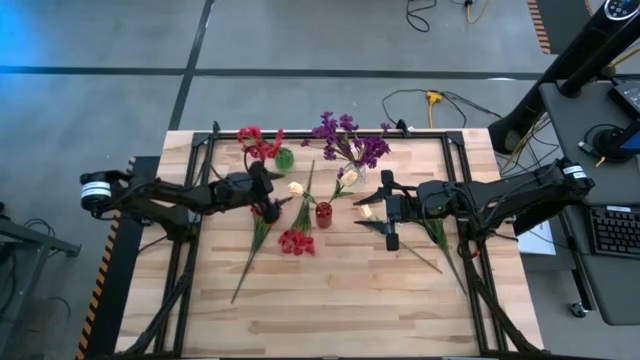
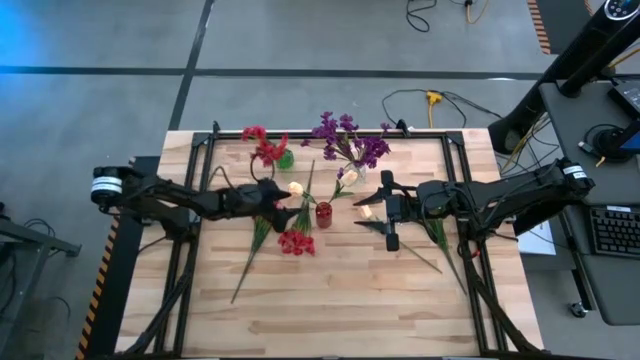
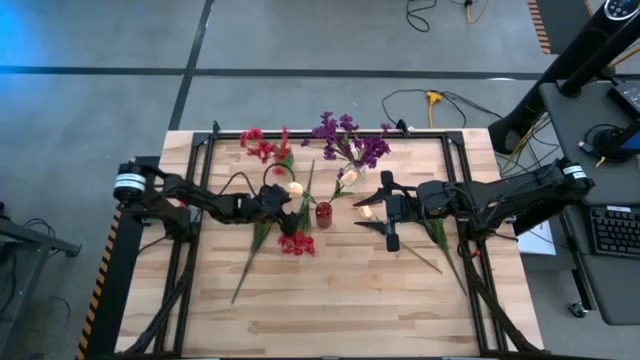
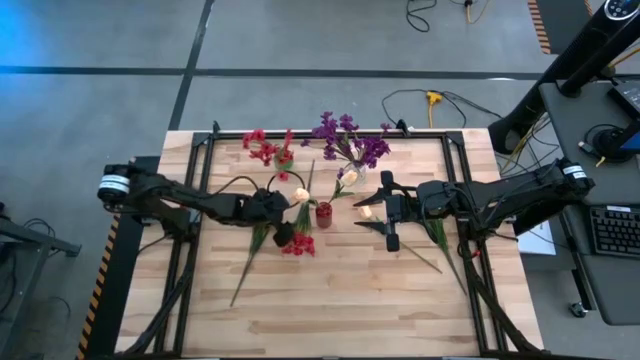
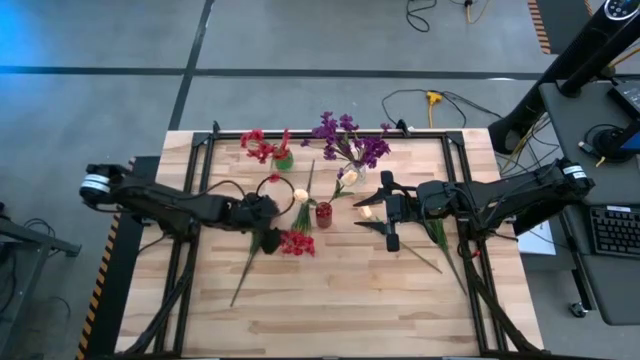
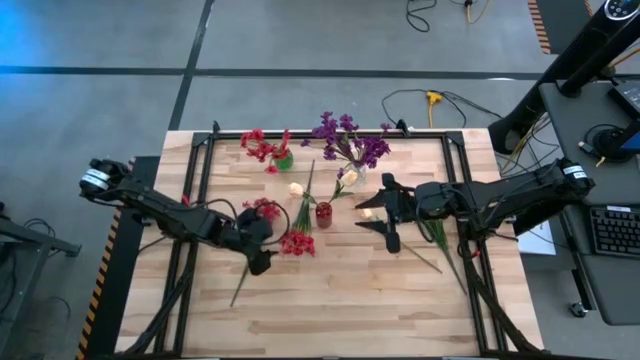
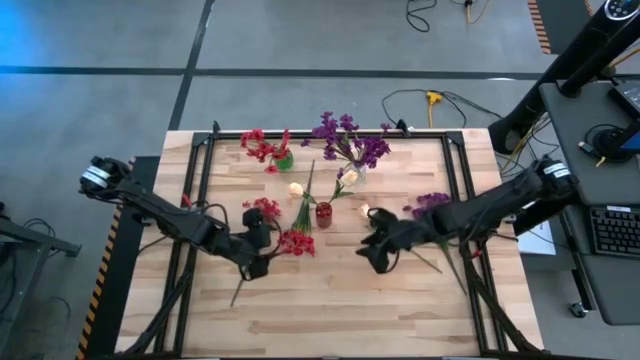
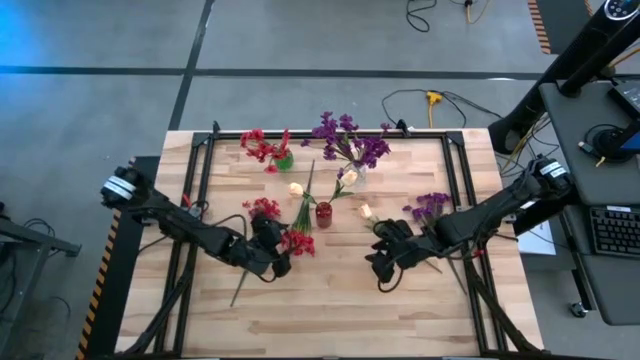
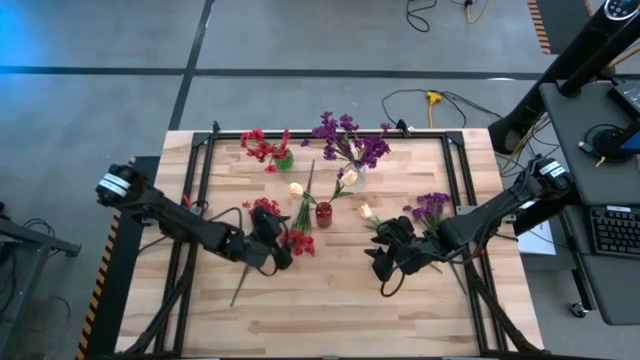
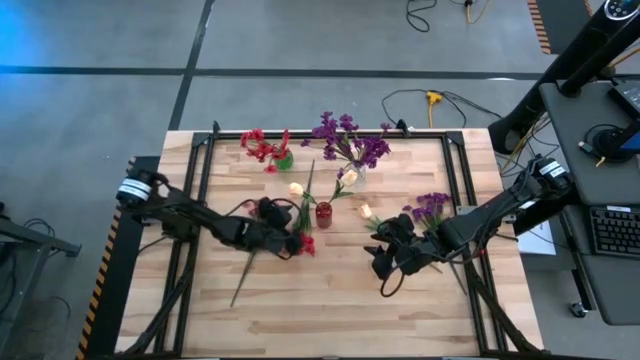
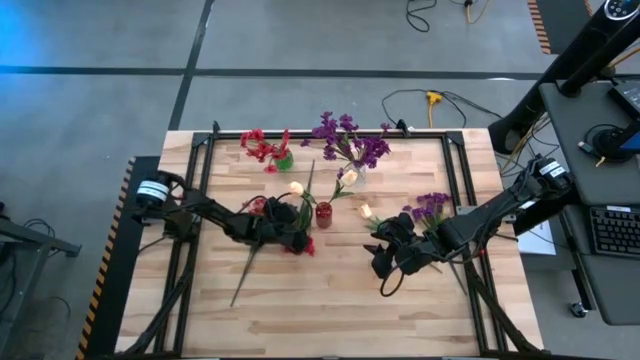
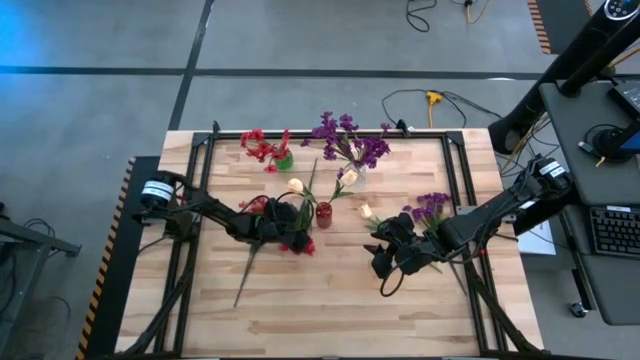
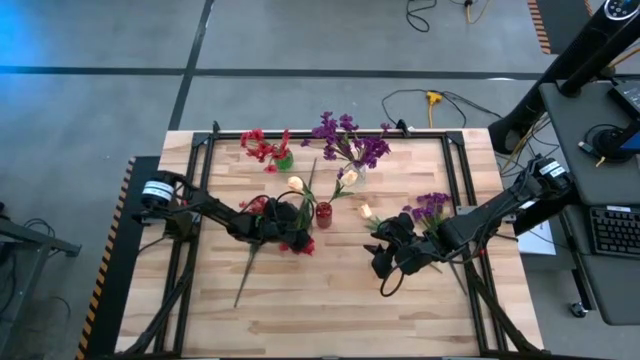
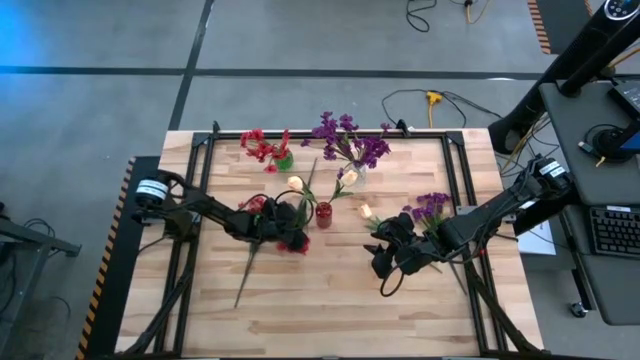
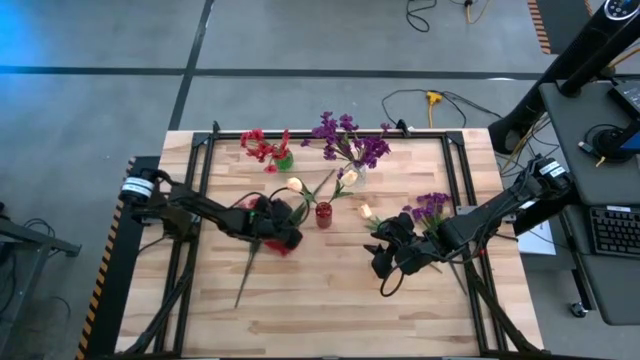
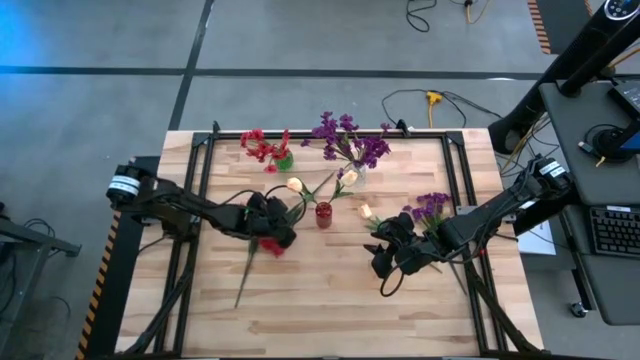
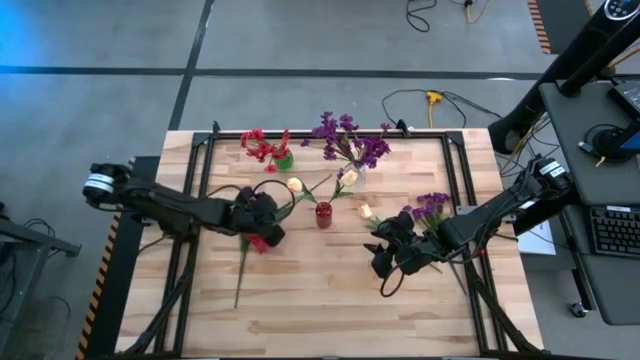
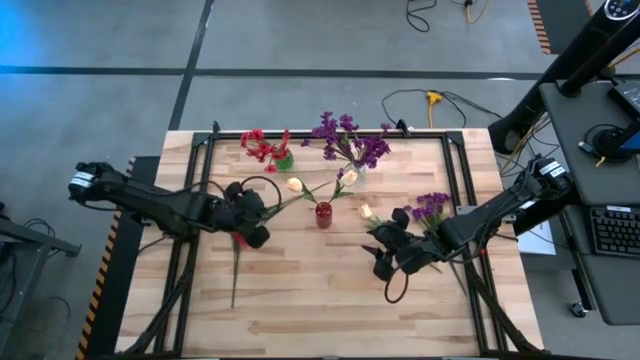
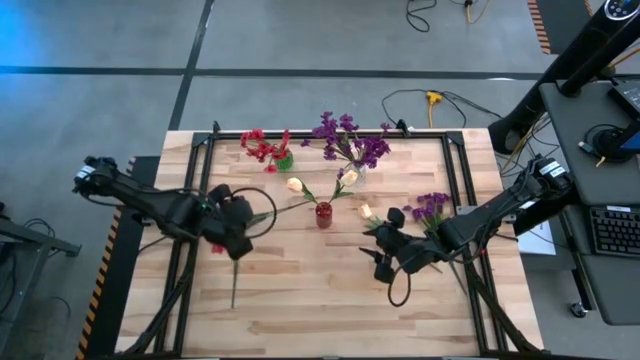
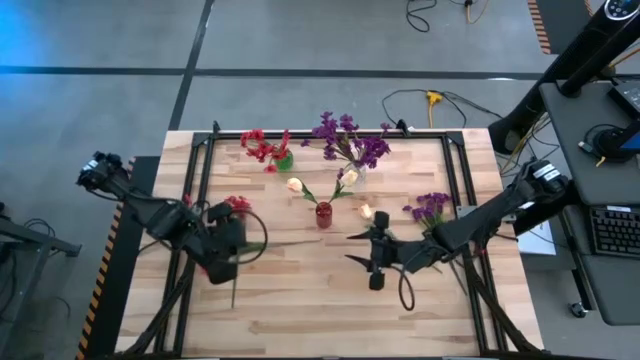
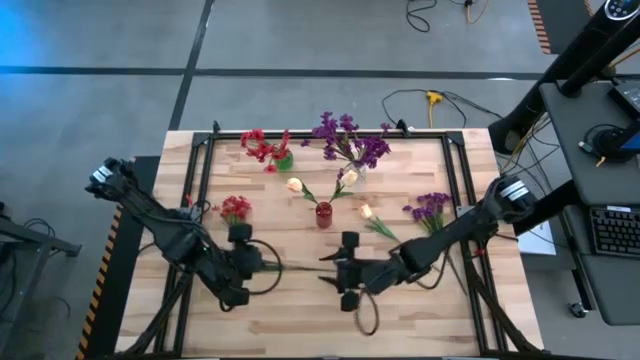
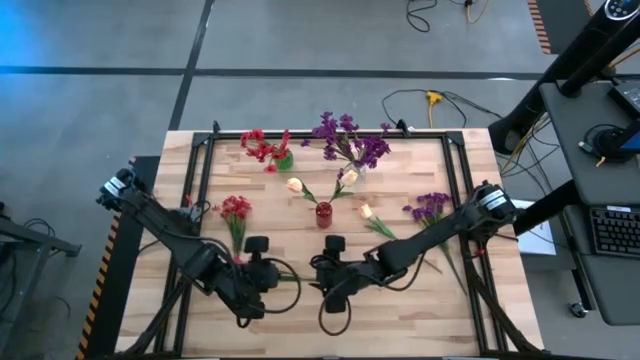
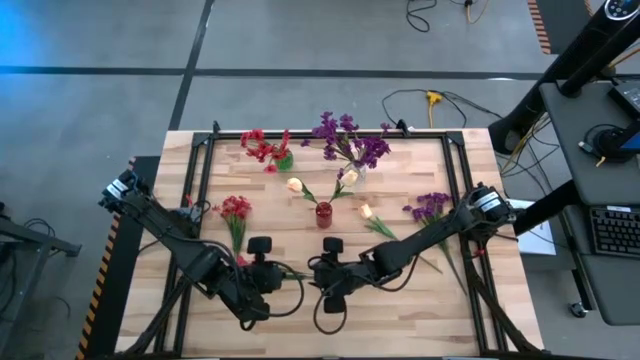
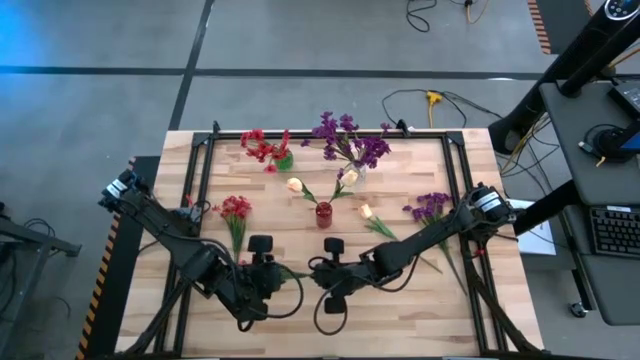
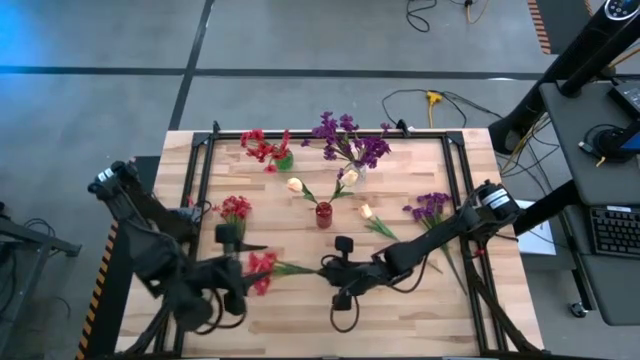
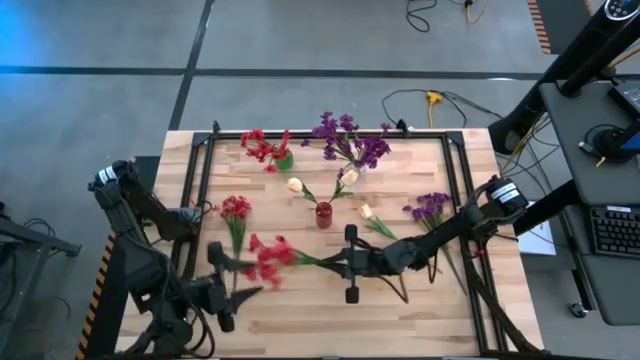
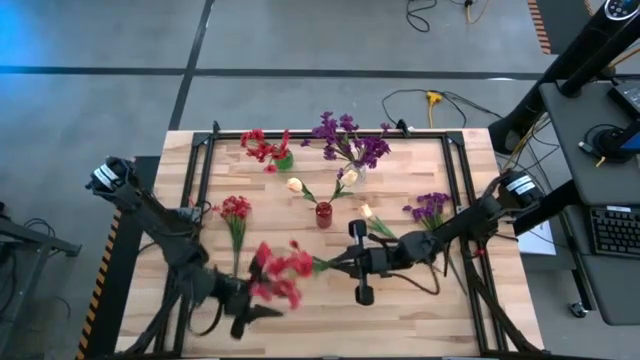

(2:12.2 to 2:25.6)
Task: Sort flowers into vase by color
Put the red flowers into the green vase

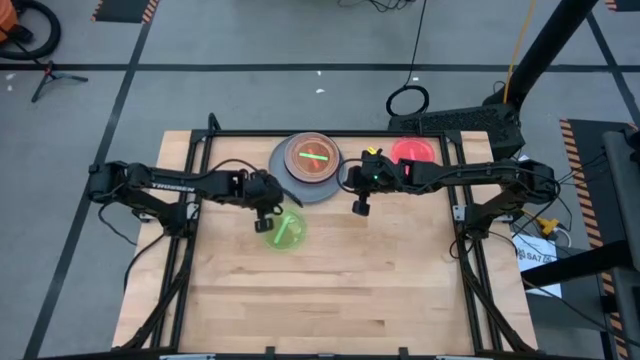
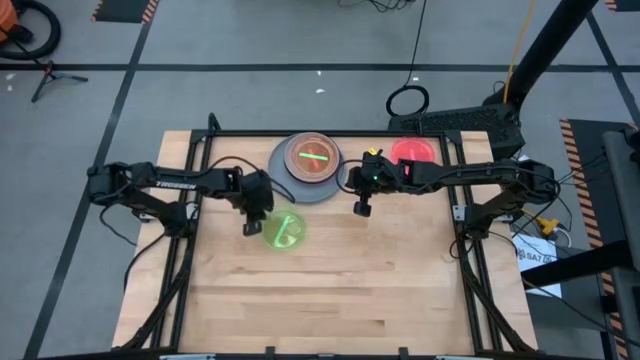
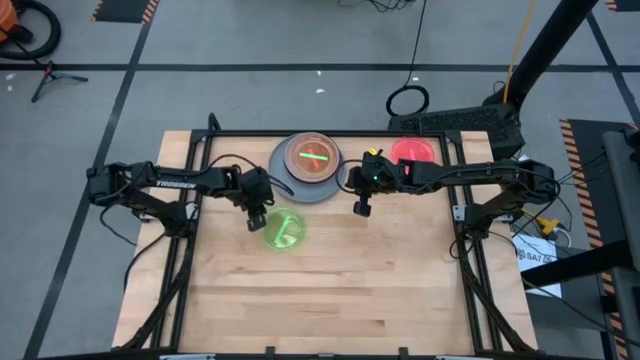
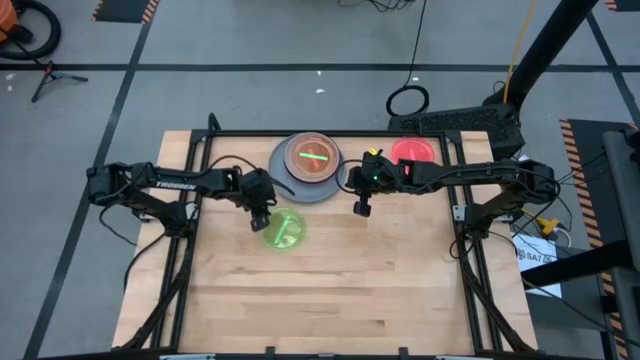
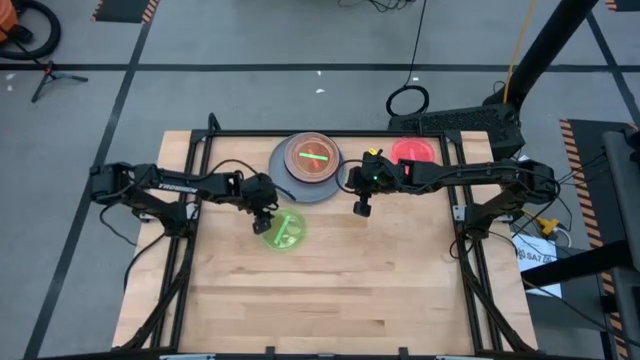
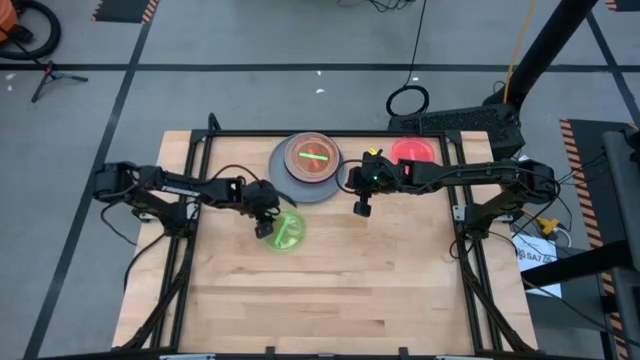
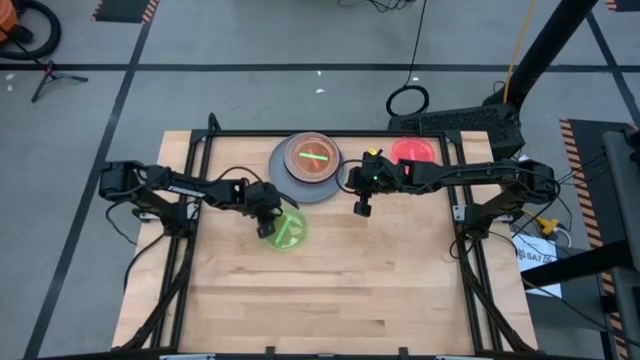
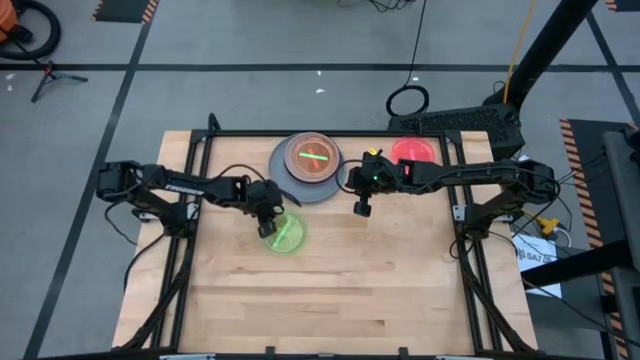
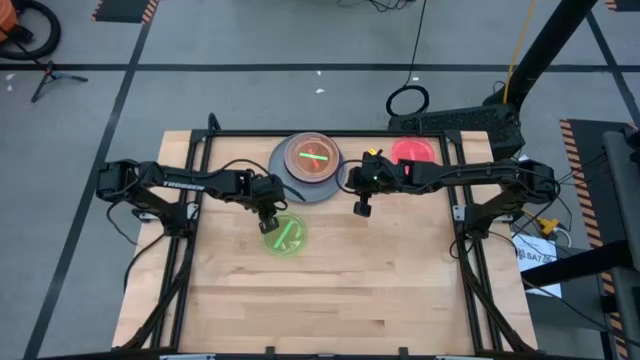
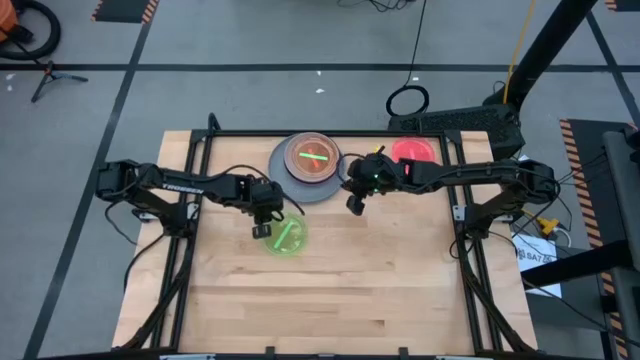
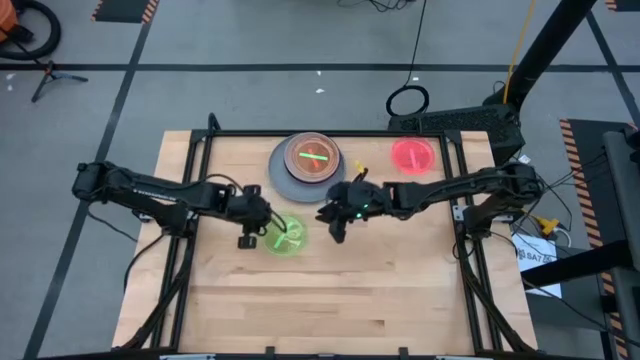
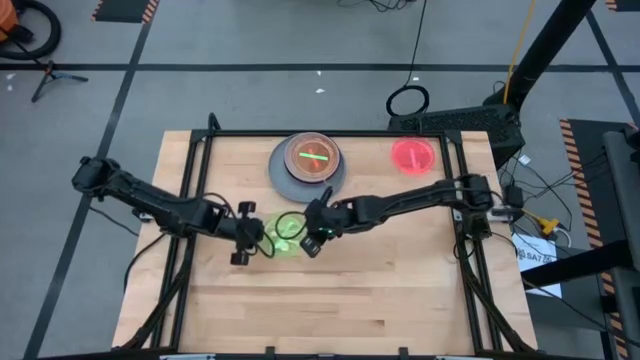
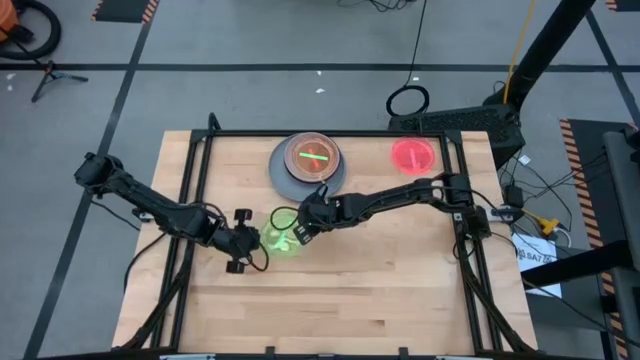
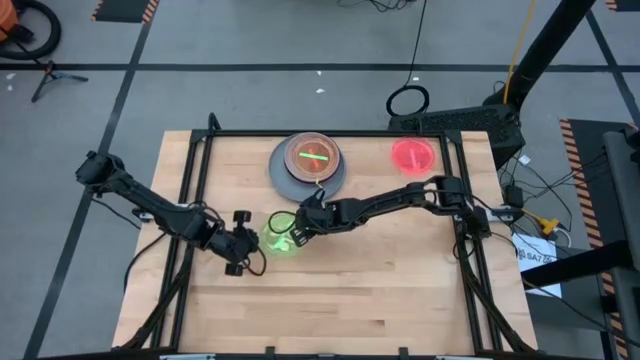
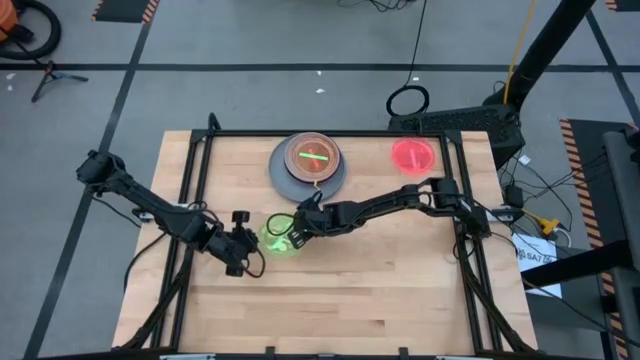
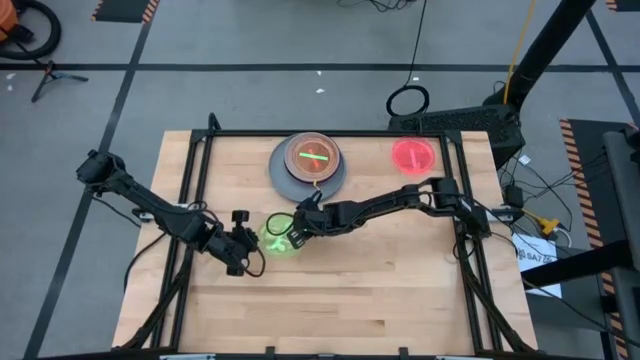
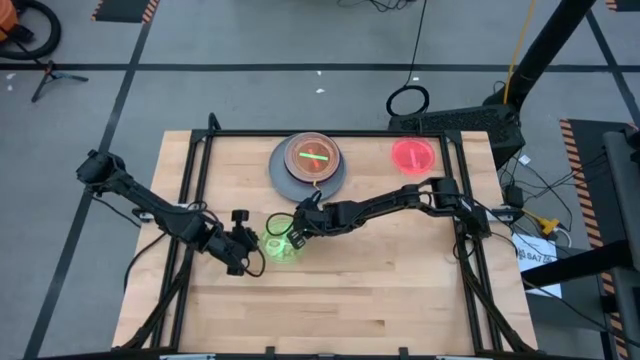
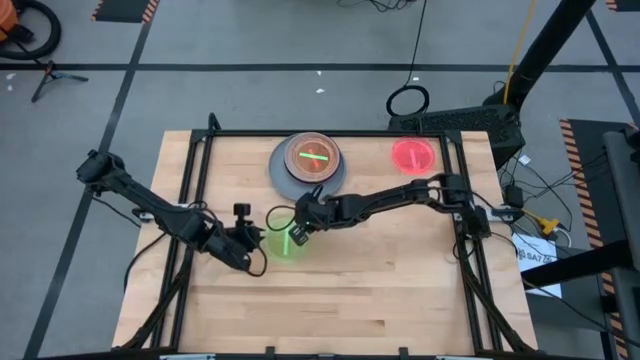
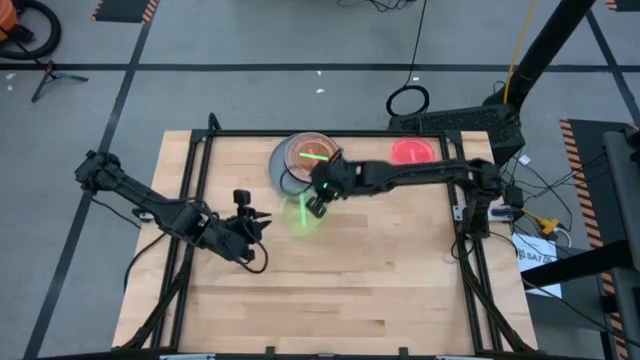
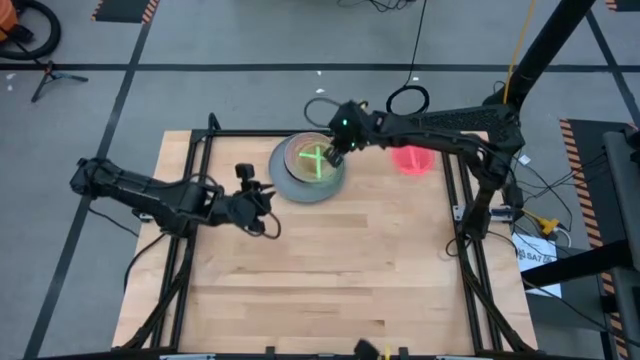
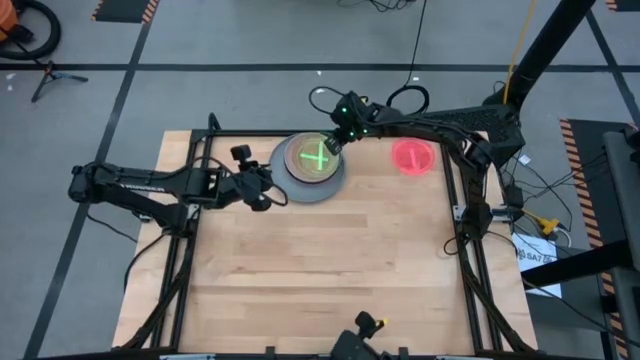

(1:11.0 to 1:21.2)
Task: Stack plastic plates
Stack the green plate on top of the other green plate
